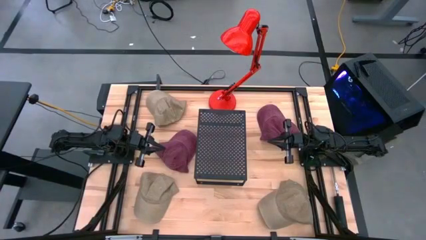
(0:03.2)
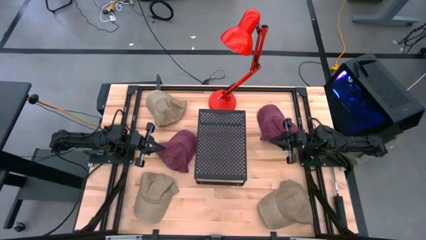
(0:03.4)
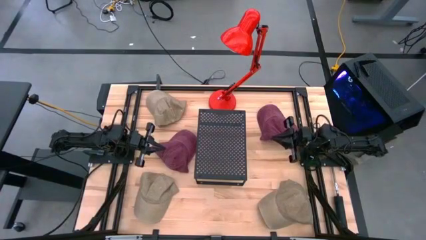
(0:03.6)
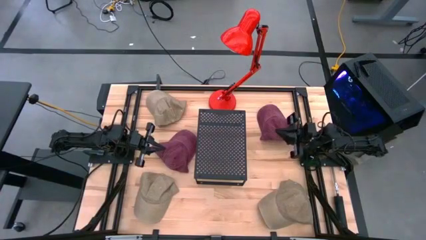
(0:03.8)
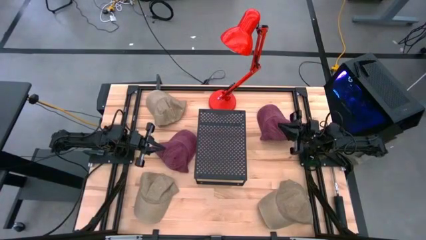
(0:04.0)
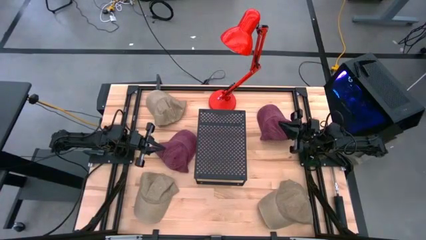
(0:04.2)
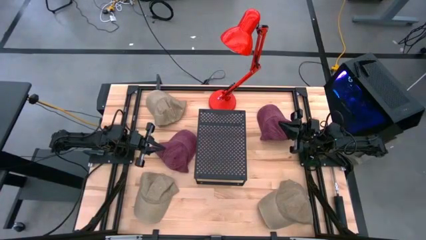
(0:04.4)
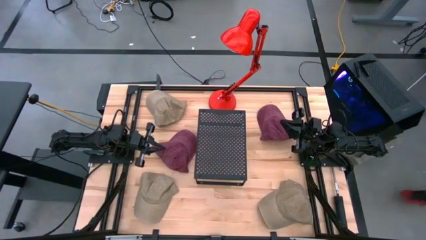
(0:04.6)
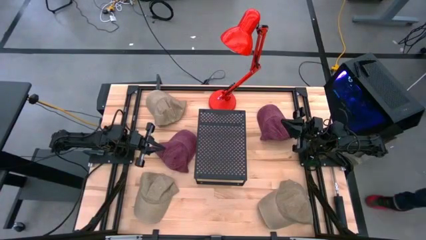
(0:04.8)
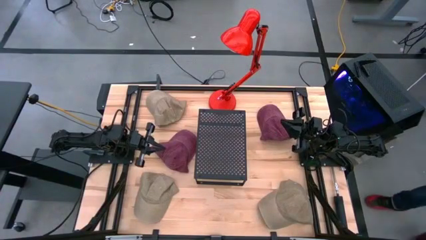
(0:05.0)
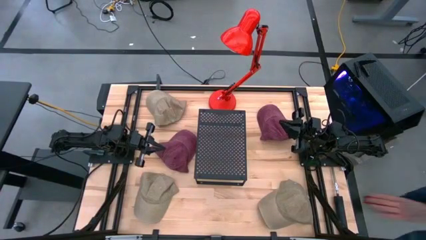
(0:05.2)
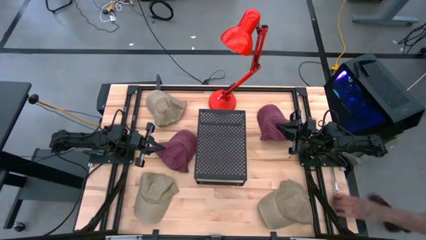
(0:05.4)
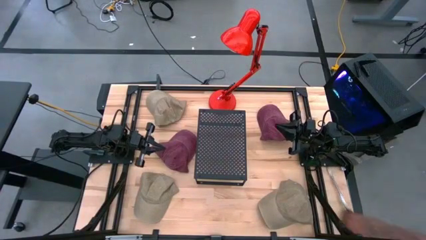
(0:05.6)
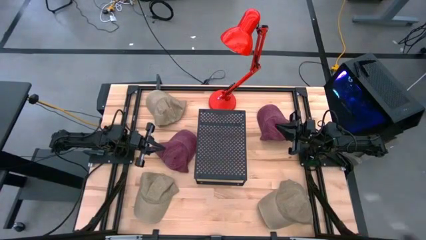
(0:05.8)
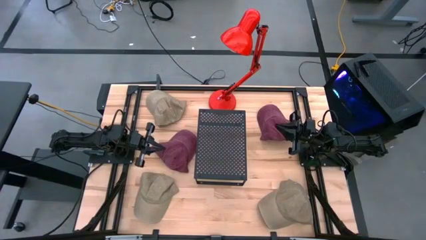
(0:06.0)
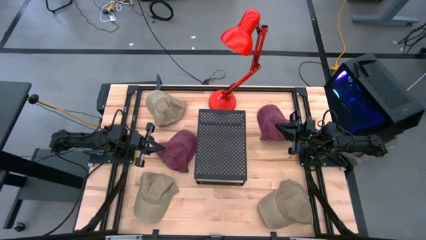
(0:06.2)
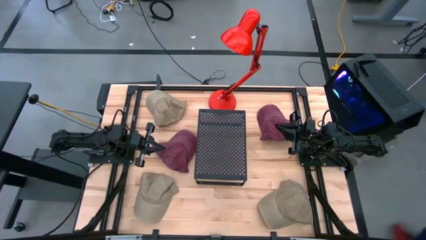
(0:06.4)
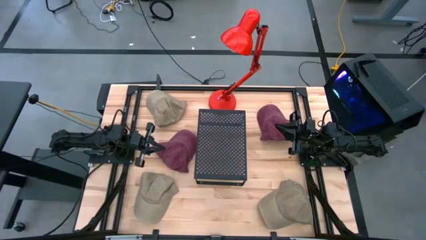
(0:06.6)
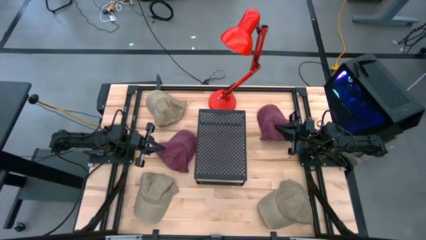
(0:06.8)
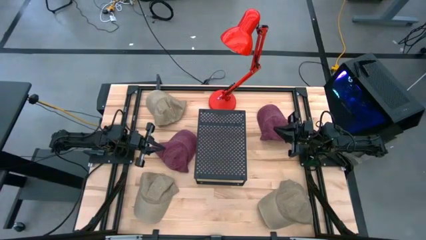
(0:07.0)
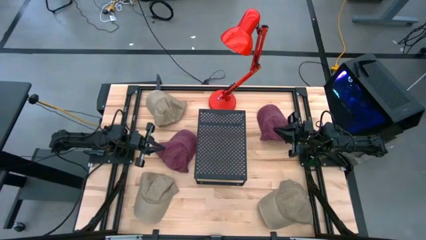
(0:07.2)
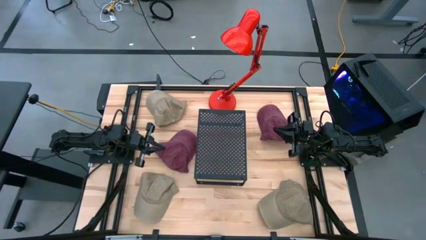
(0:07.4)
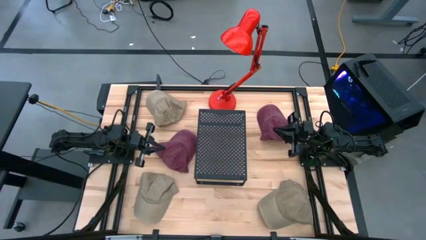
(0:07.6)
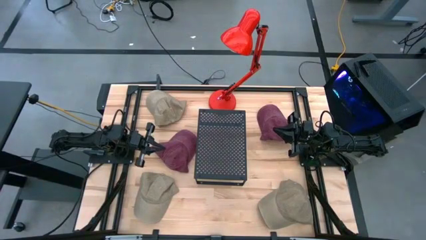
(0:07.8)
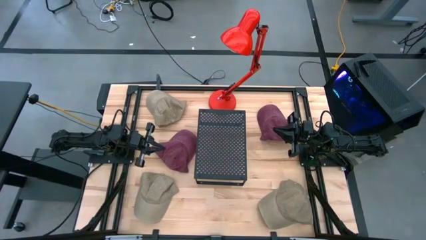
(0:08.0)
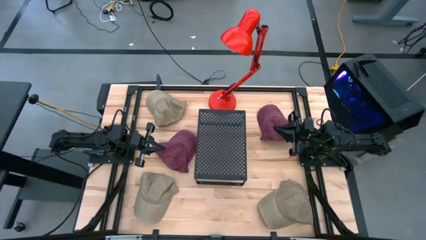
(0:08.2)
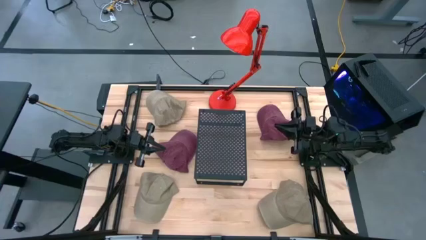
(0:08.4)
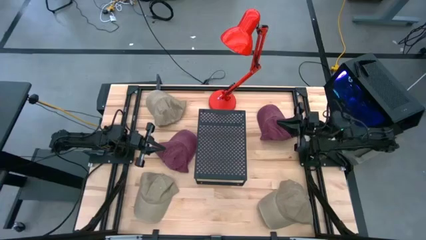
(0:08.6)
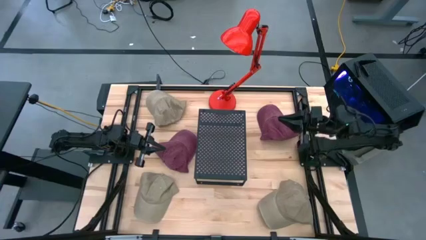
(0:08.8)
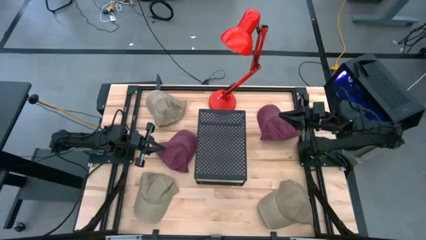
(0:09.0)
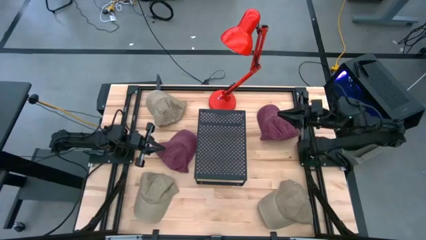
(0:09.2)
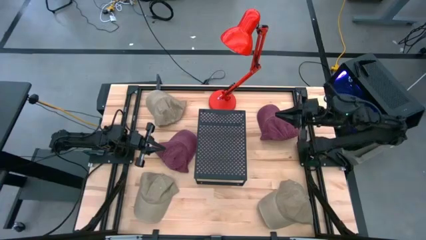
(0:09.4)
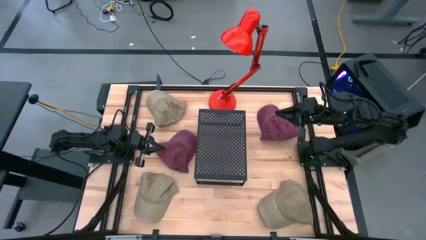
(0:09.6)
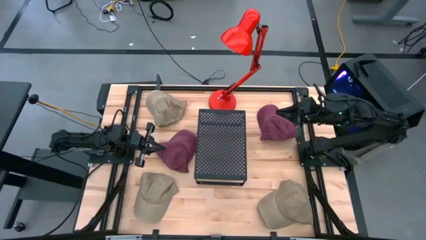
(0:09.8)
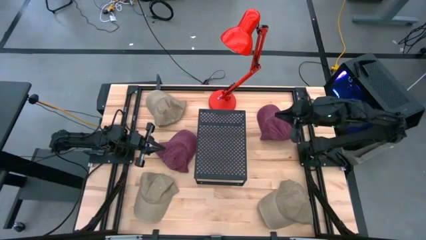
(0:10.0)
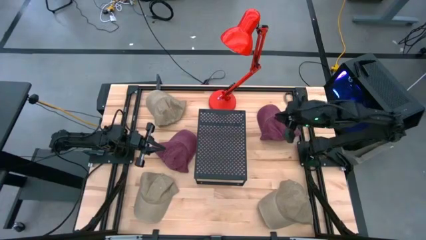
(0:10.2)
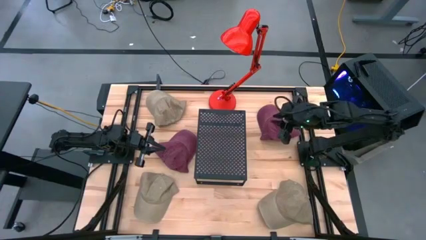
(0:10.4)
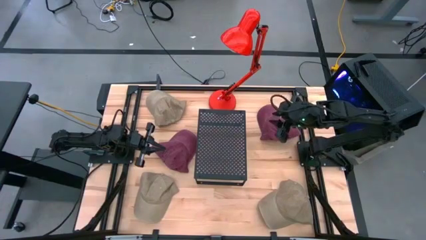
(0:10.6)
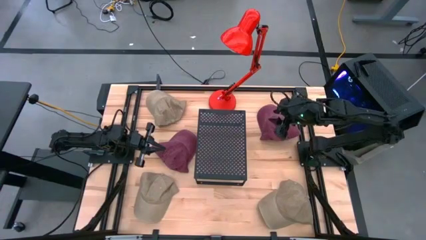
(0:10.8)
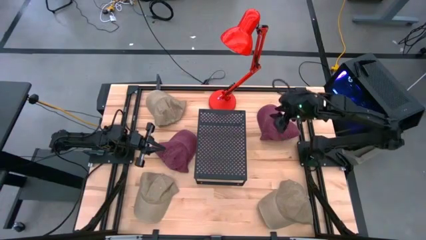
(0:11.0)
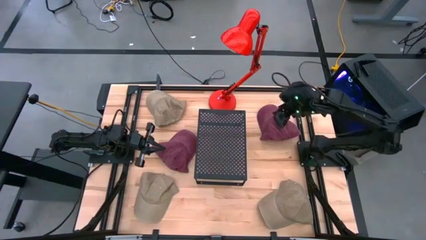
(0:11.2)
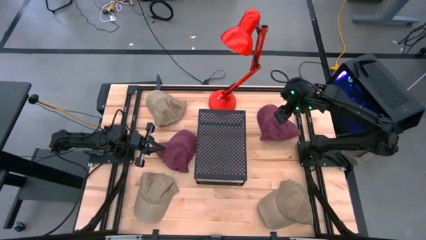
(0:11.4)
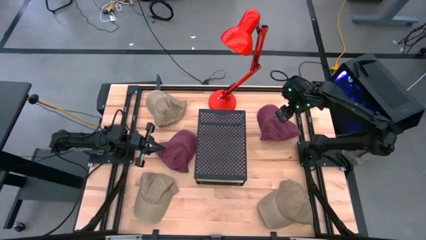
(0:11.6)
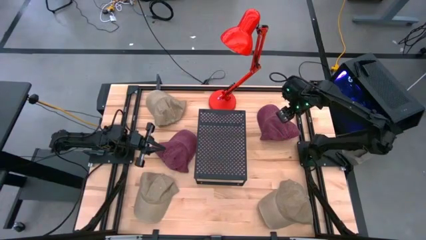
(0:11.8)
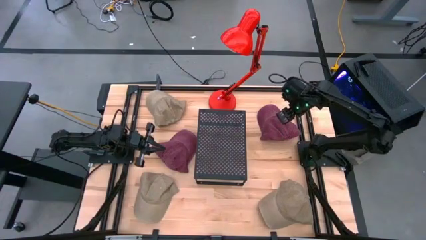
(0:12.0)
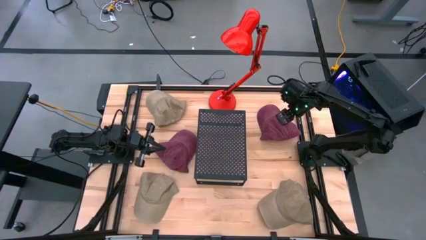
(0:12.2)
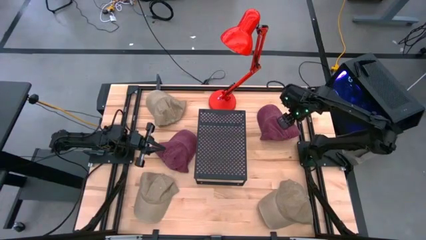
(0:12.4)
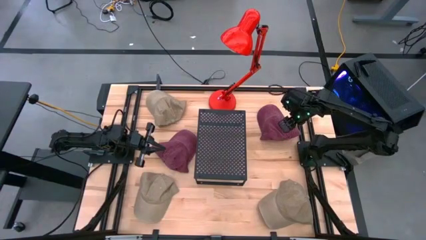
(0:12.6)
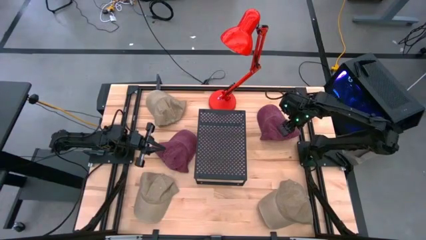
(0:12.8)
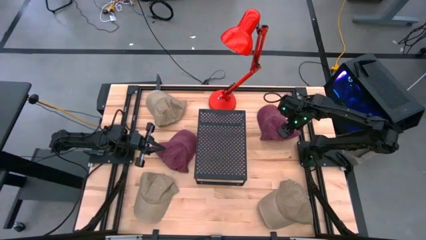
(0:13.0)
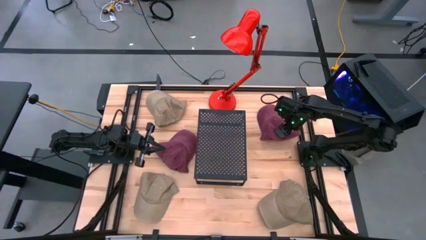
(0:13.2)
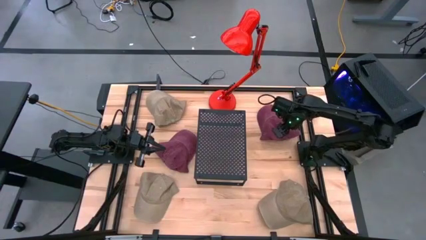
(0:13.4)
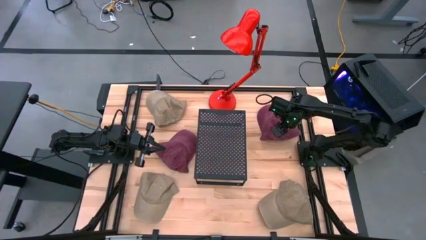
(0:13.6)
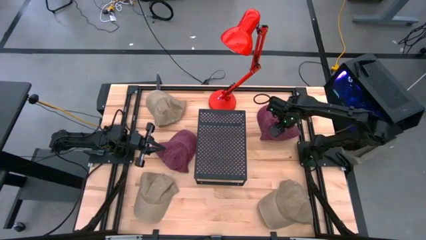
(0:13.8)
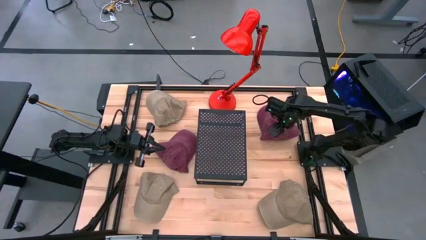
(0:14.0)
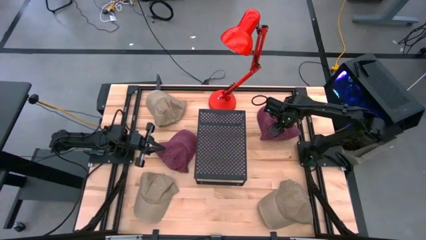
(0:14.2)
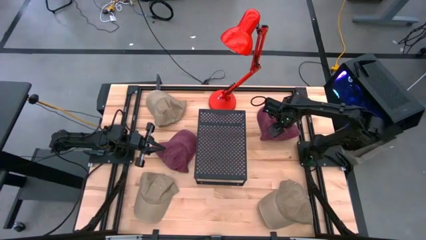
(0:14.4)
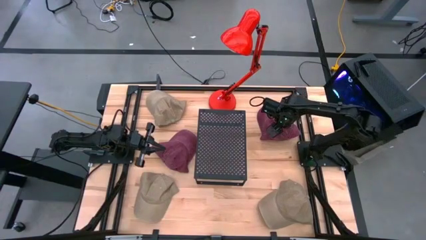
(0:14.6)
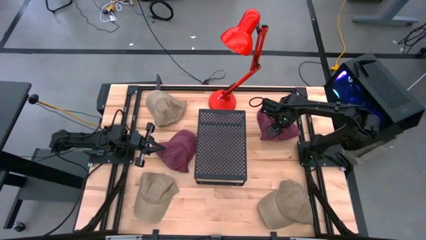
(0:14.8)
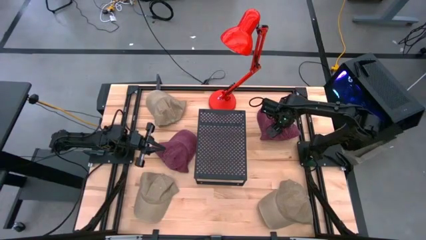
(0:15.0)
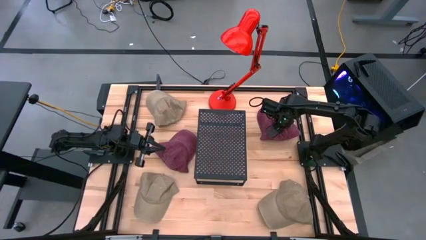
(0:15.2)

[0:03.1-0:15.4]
Task: Pick & Place hat
Put the right red cap on the shelf
